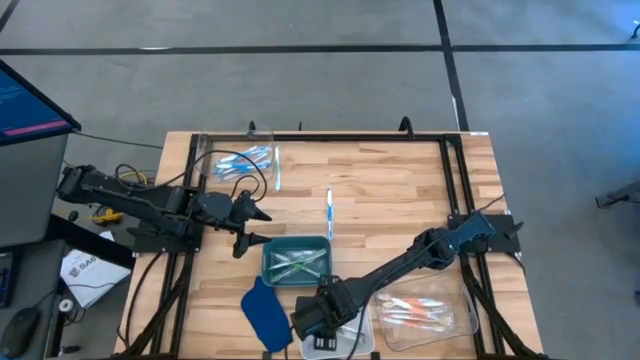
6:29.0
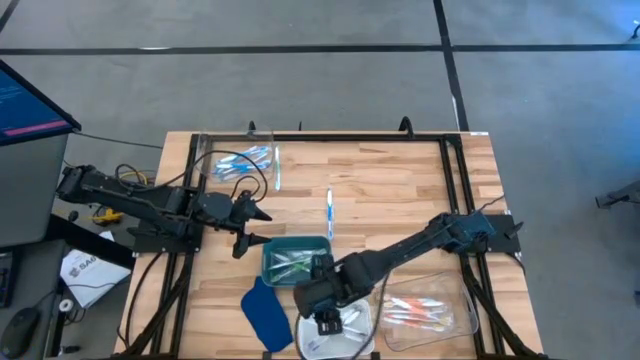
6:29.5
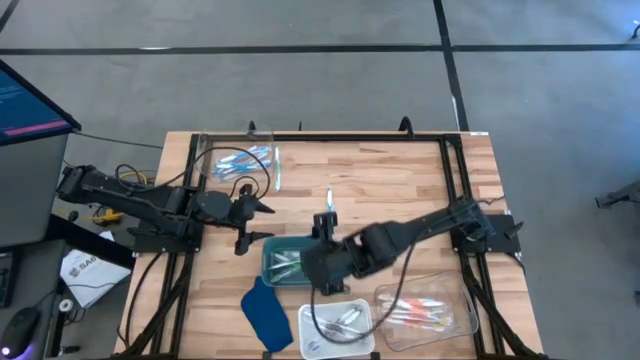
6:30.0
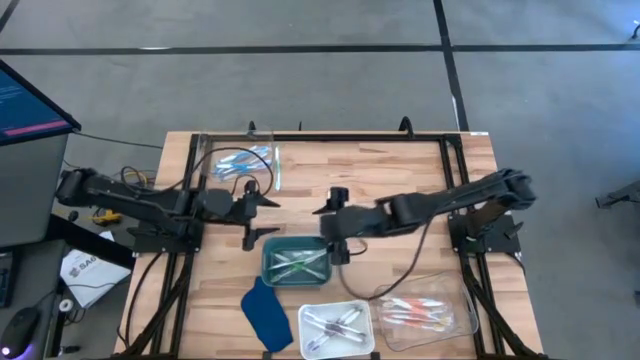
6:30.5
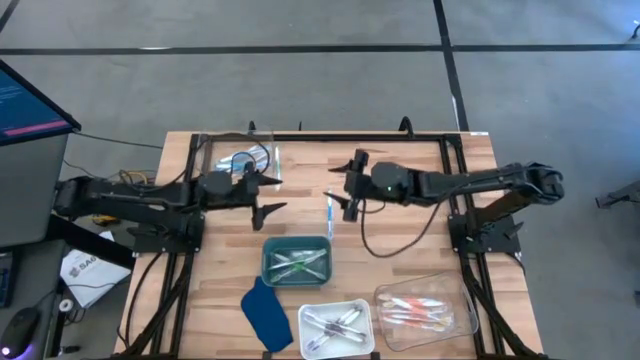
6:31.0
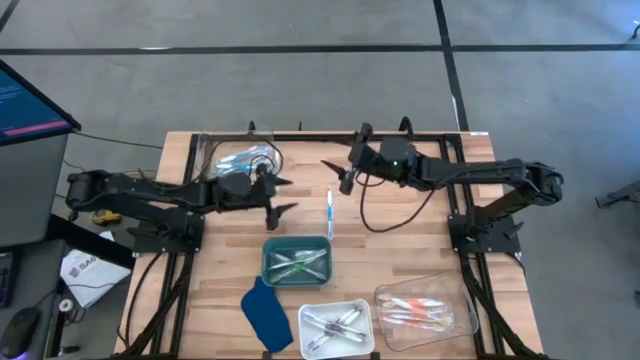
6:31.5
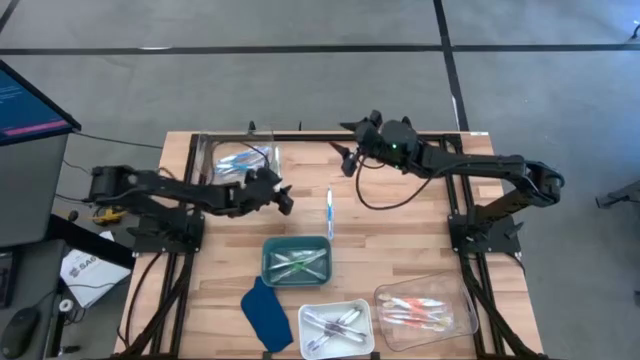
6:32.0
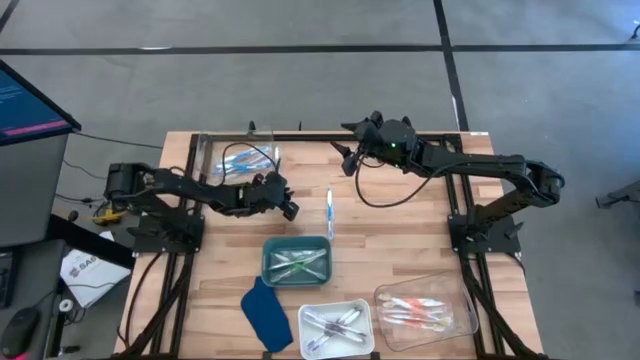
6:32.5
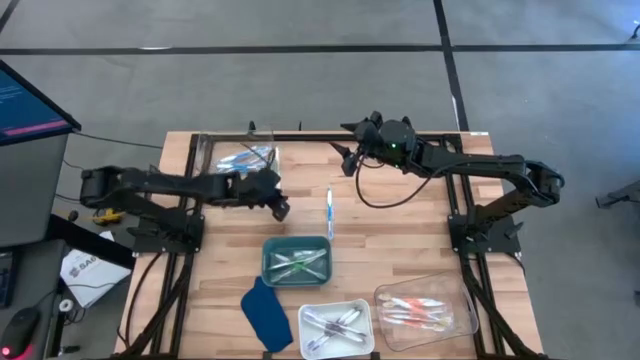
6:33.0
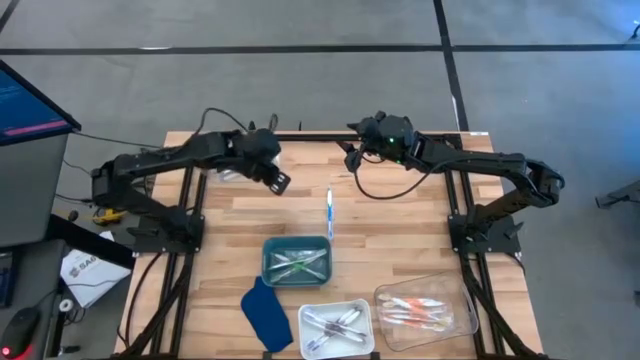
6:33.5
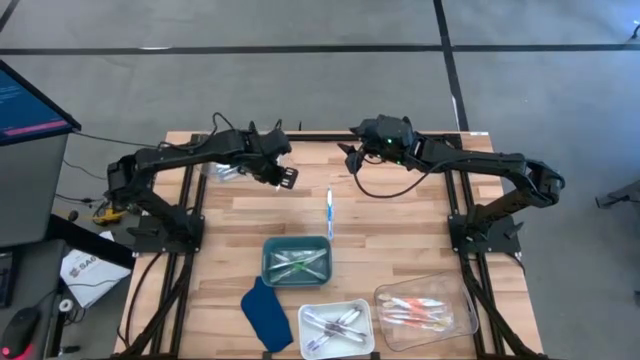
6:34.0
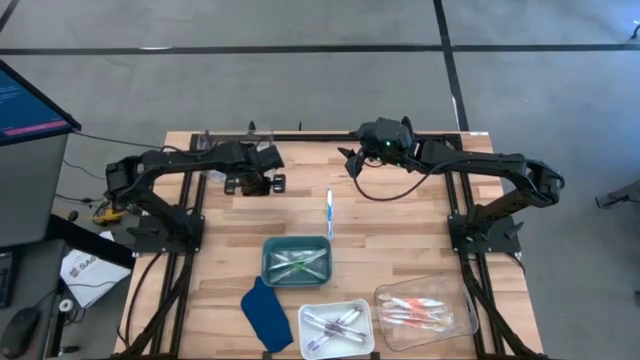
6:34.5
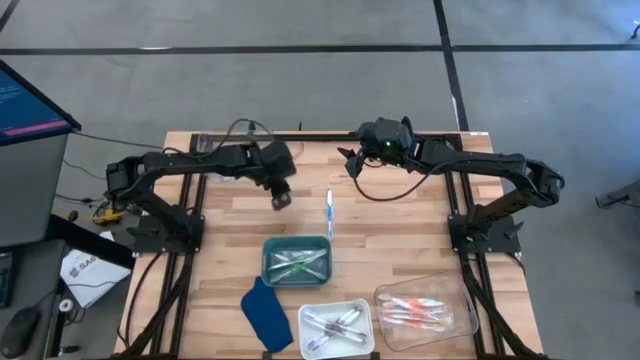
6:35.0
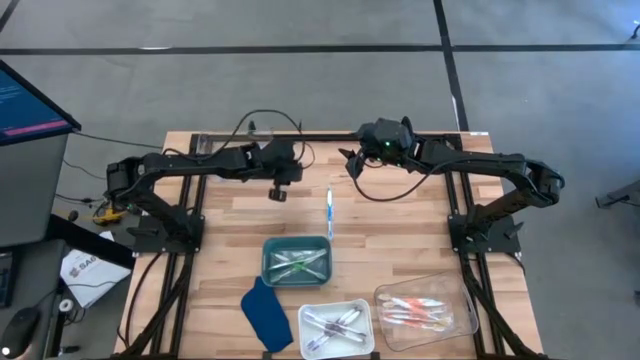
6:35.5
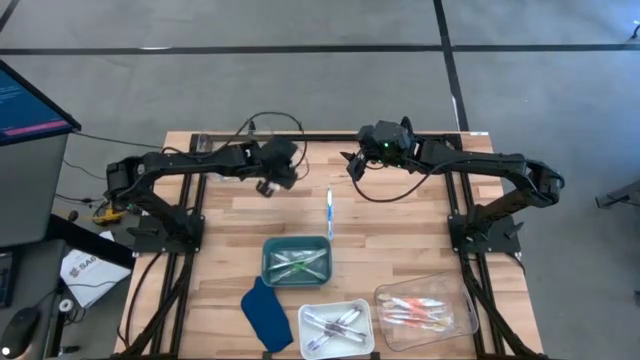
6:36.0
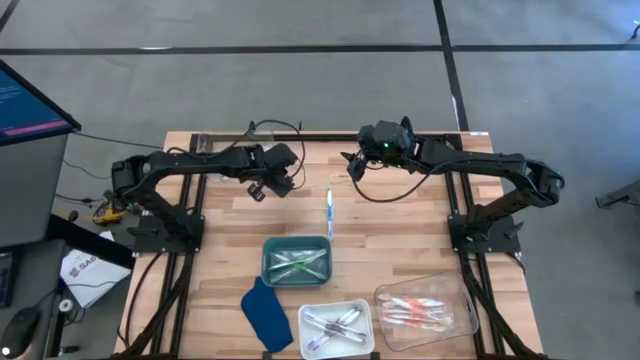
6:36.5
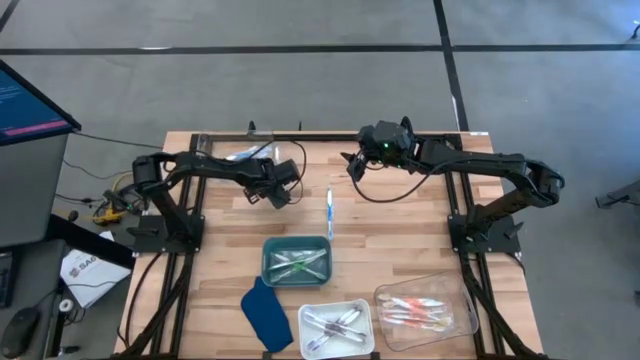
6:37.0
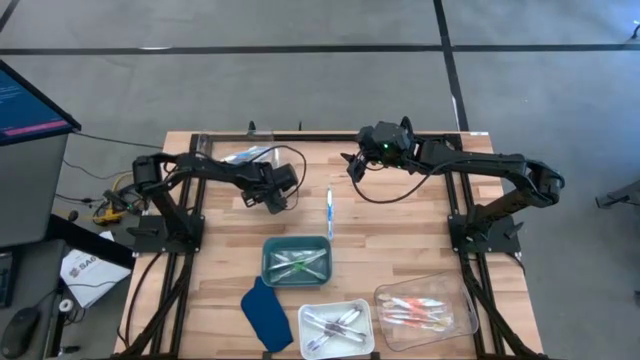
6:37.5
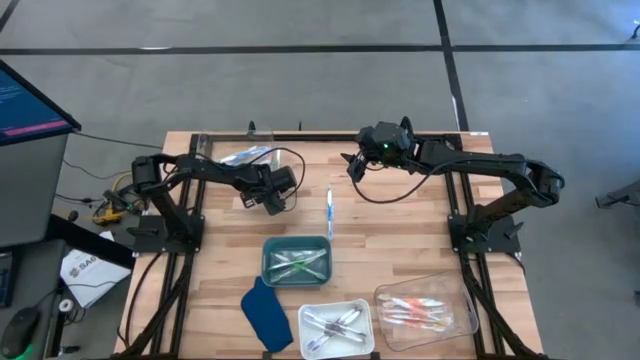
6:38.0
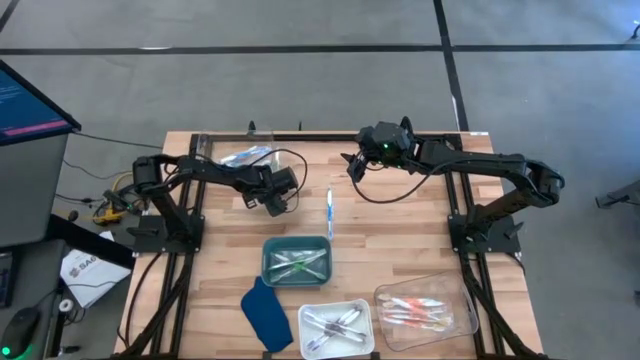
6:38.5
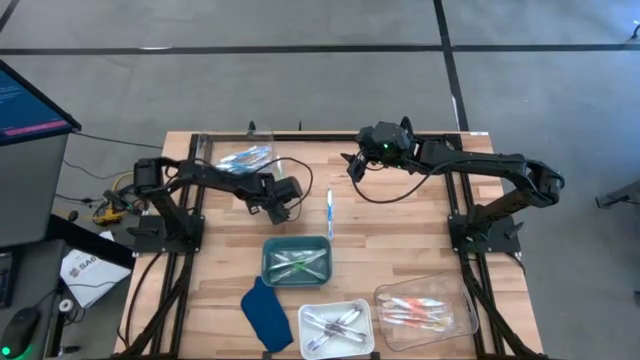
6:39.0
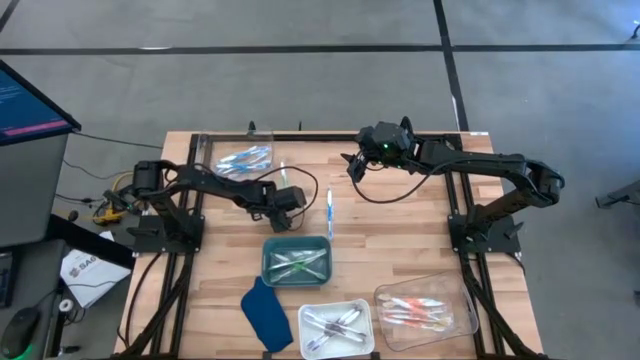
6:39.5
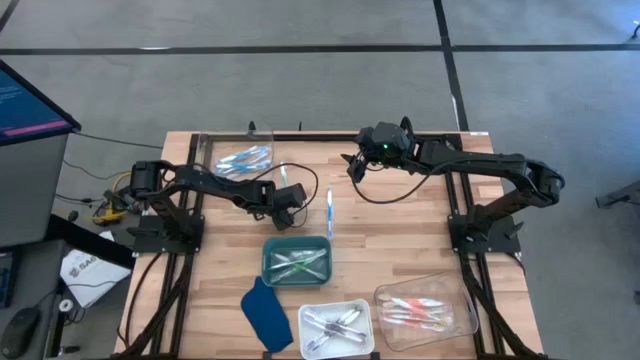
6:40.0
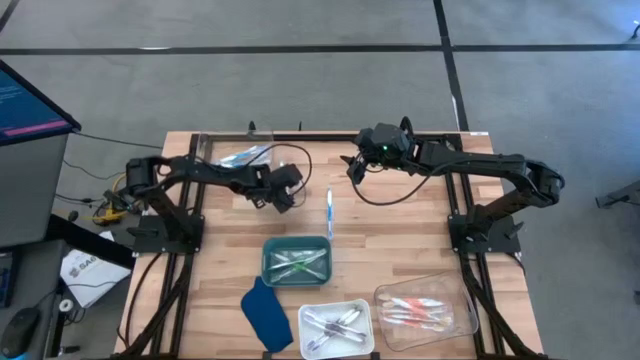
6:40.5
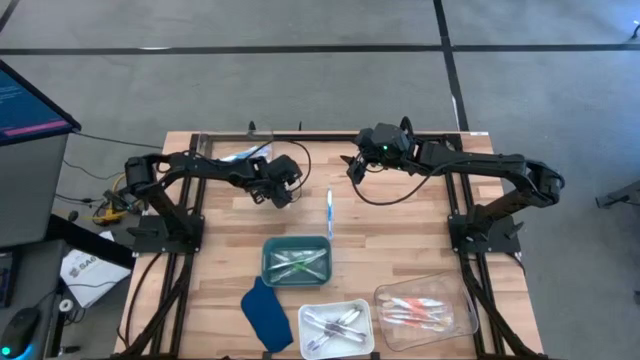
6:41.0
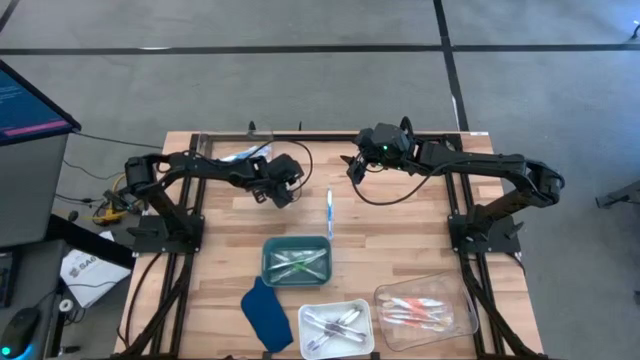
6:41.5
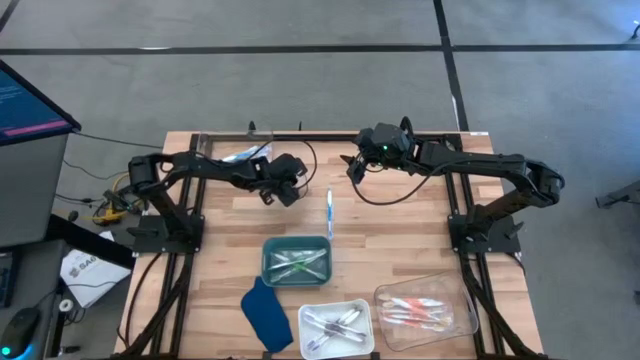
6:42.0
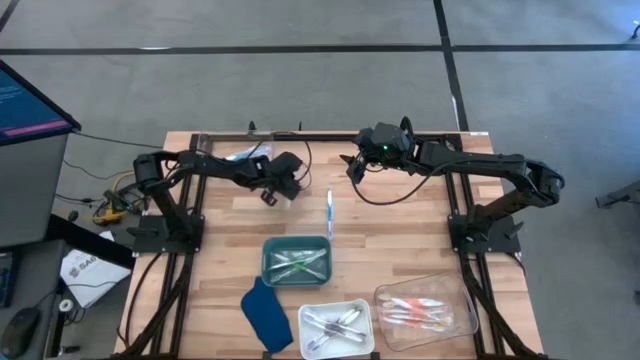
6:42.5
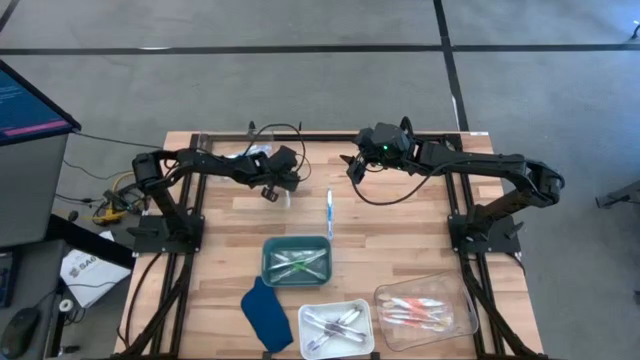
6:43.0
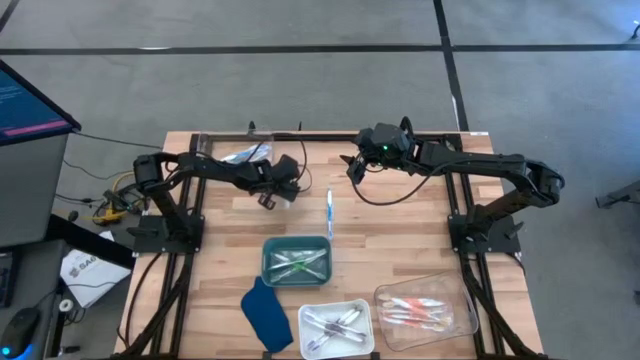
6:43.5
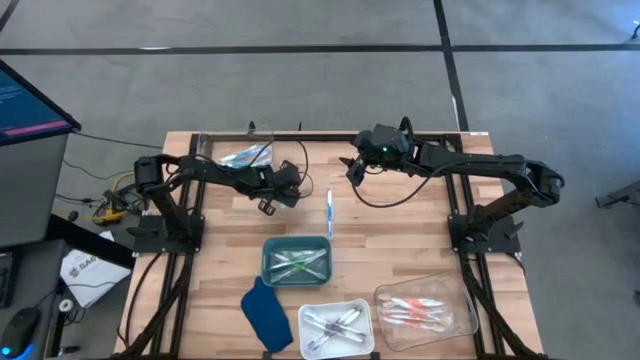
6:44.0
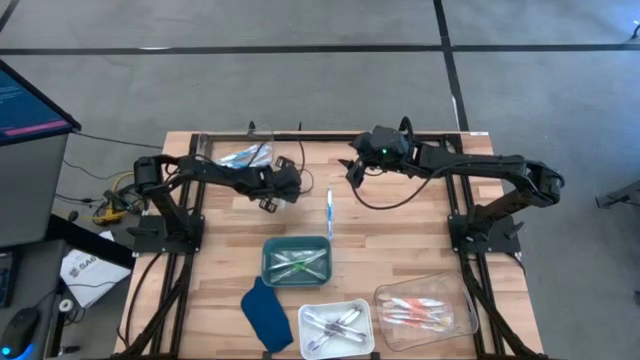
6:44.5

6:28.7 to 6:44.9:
Task: Pick & Place Toothbrushes
Put the green toothbrush into the green bin

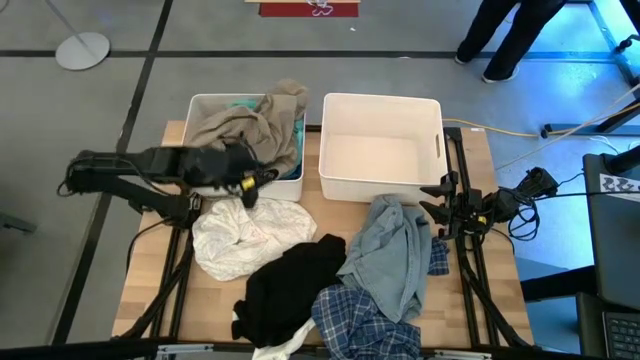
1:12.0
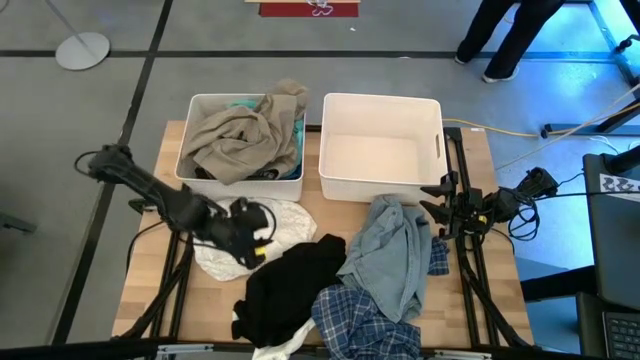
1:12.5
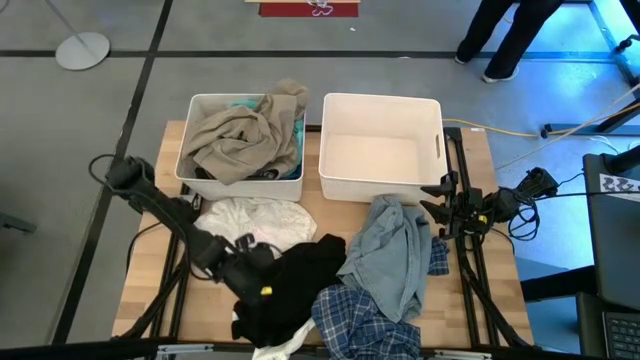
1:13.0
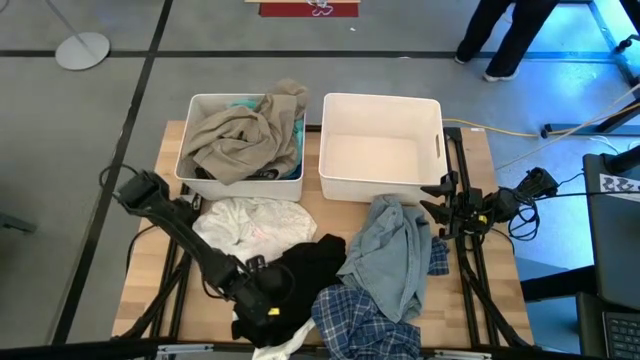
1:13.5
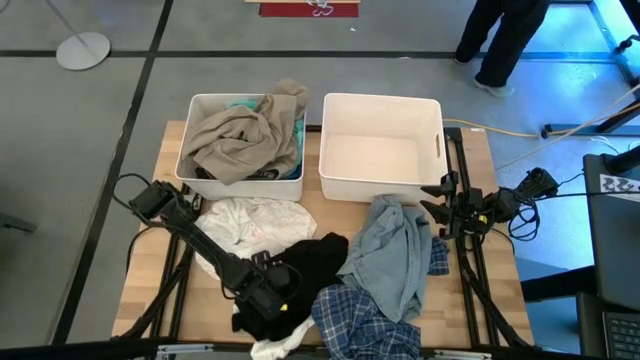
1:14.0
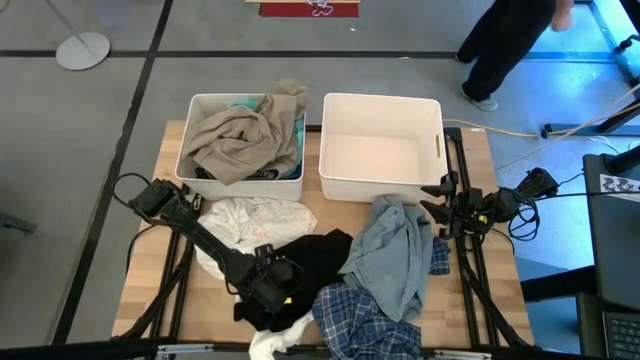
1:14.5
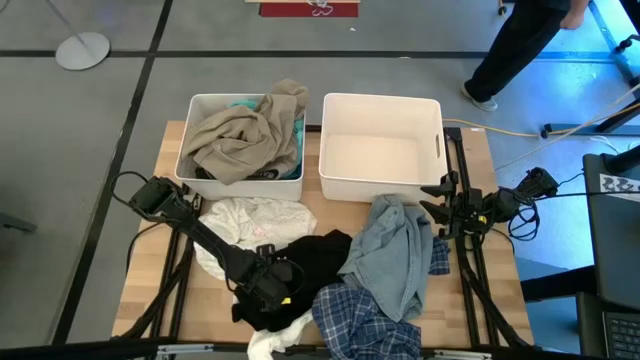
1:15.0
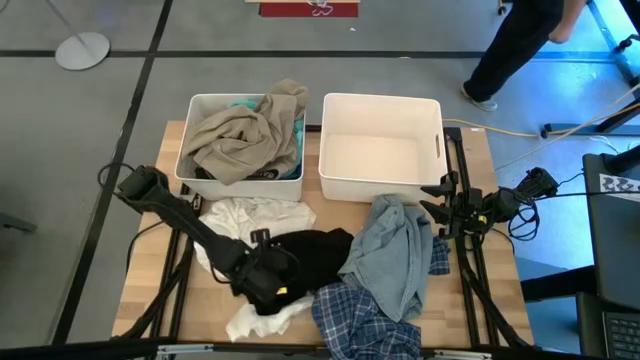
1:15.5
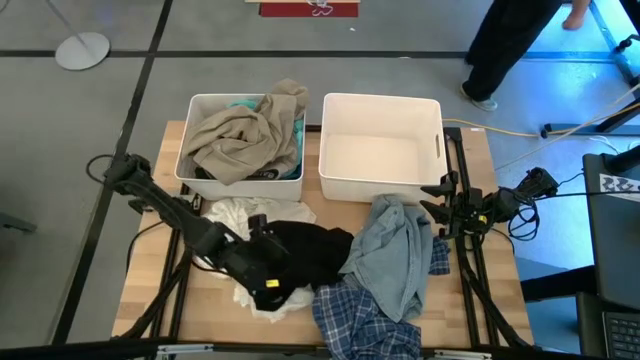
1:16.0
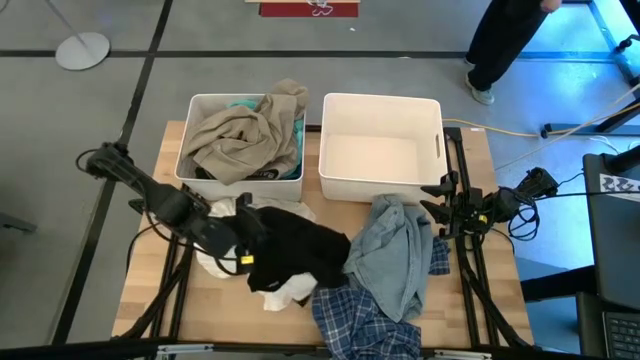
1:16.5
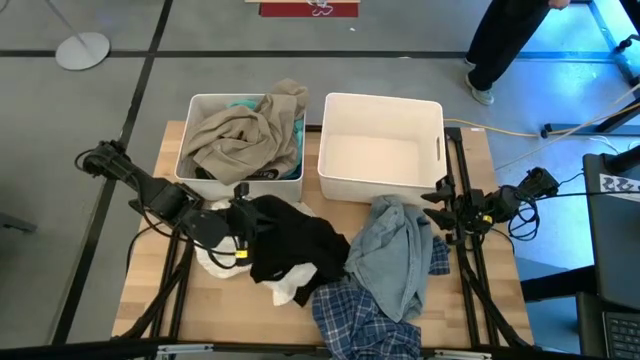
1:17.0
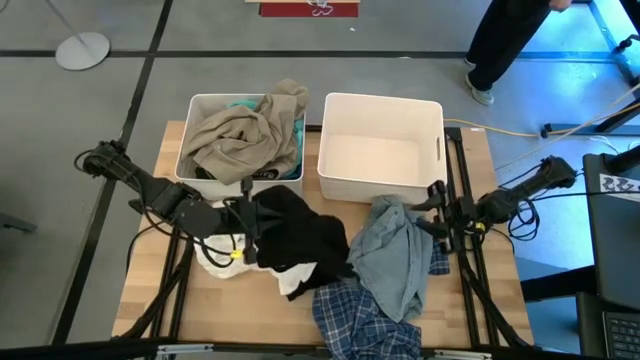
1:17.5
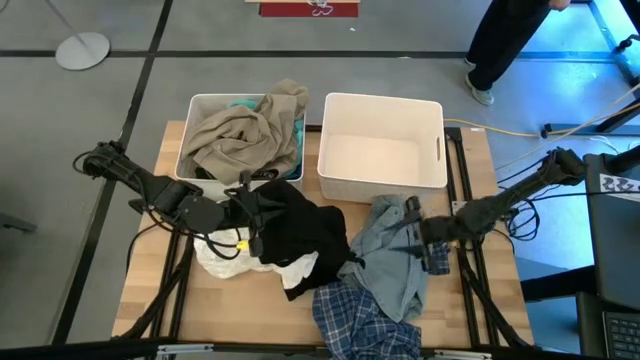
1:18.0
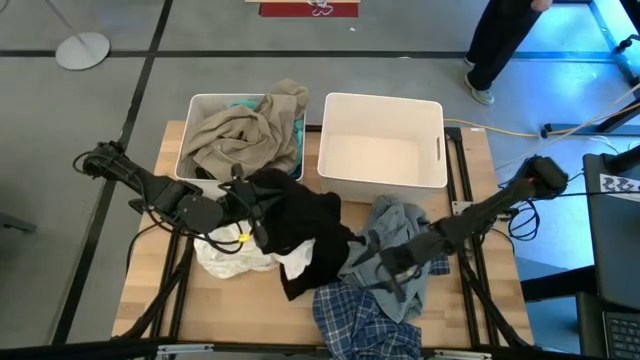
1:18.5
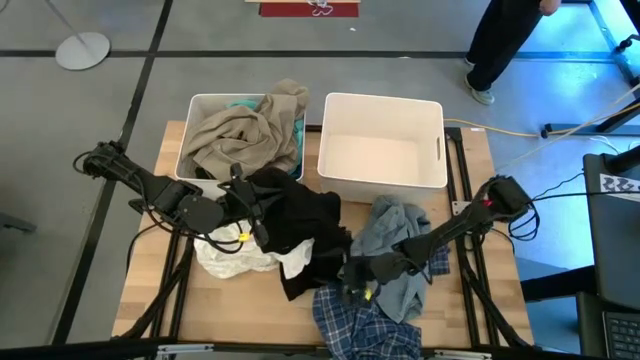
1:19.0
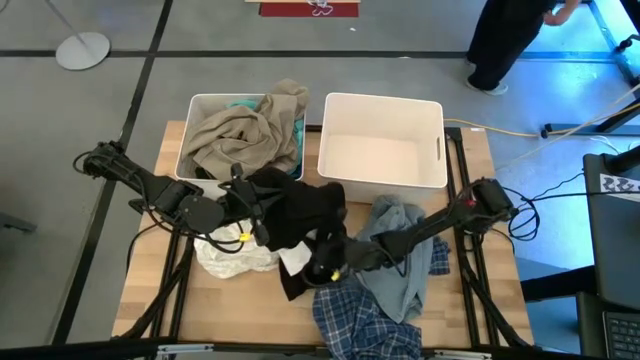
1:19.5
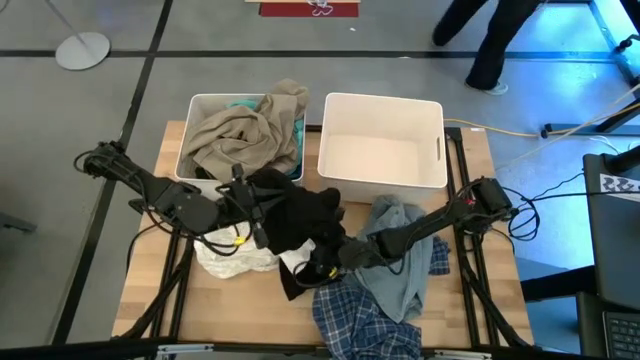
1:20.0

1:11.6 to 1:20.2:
Task: Sort clothes
Put the black underwear into the left white bin
